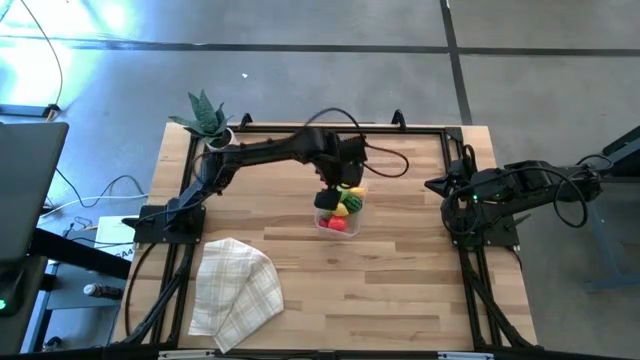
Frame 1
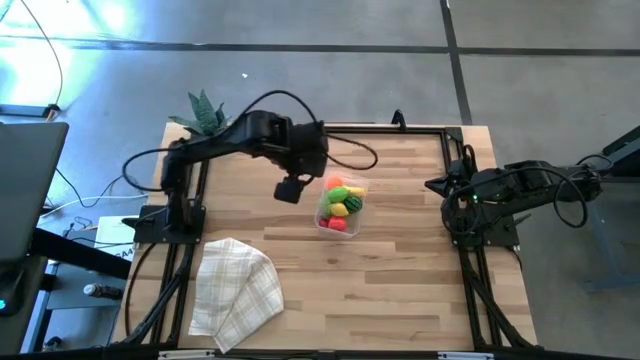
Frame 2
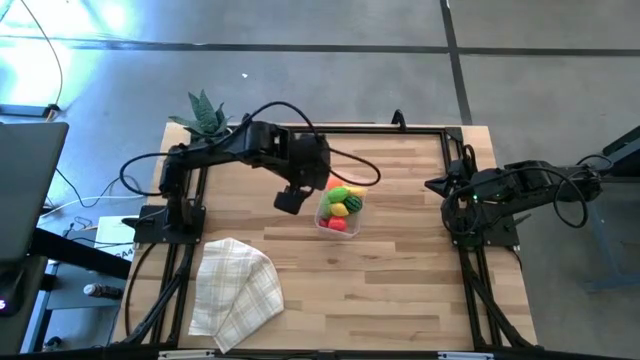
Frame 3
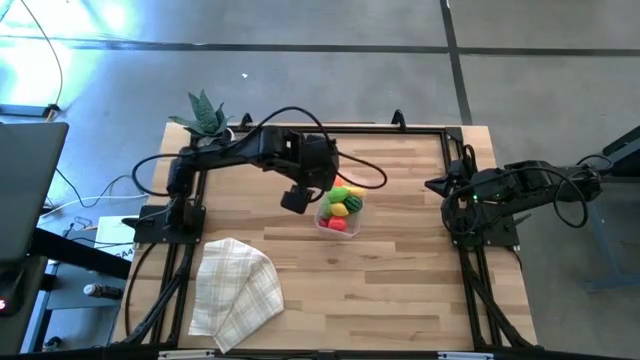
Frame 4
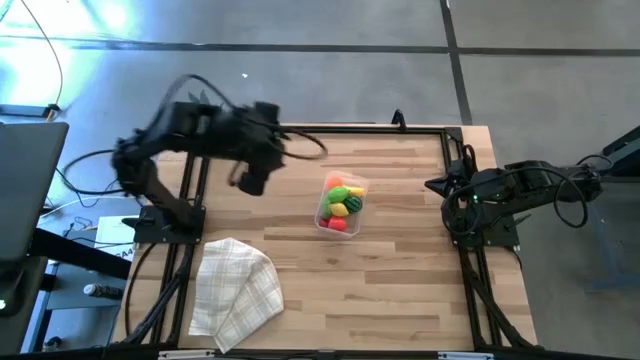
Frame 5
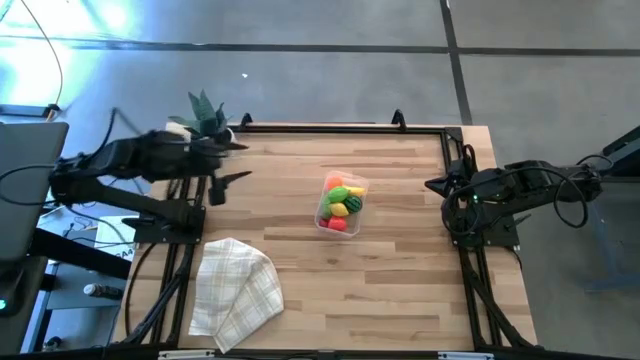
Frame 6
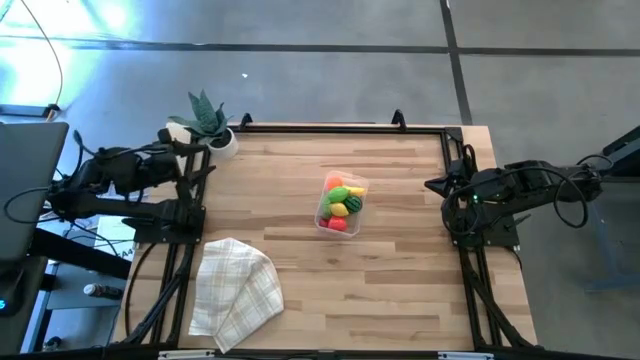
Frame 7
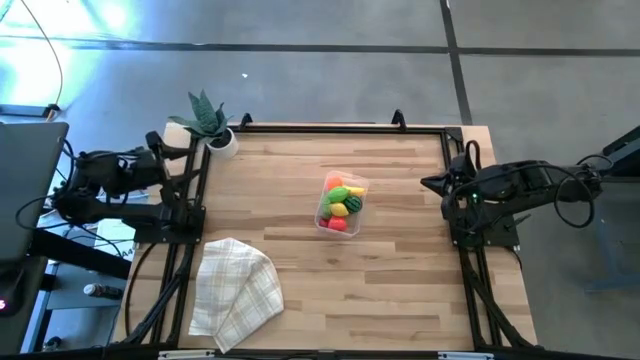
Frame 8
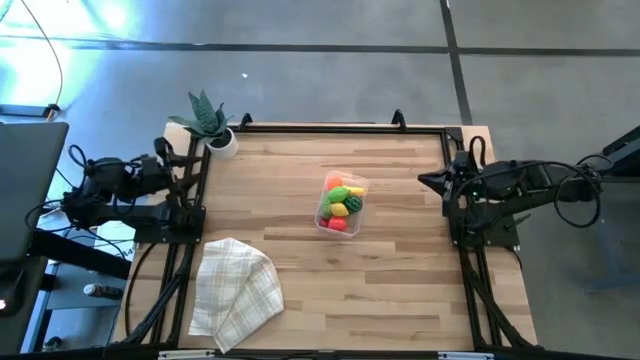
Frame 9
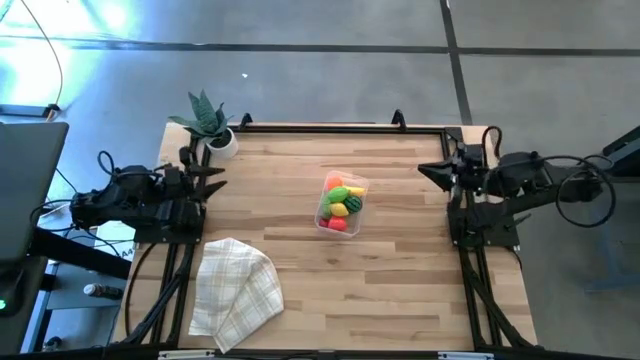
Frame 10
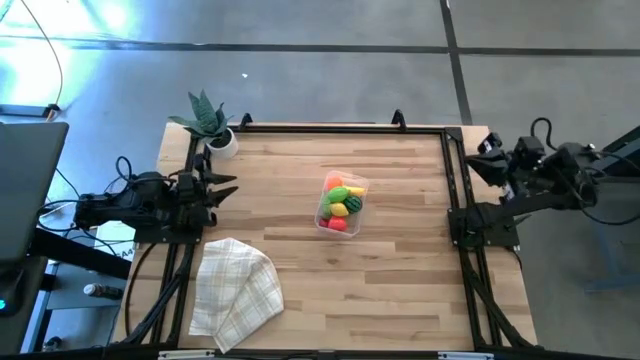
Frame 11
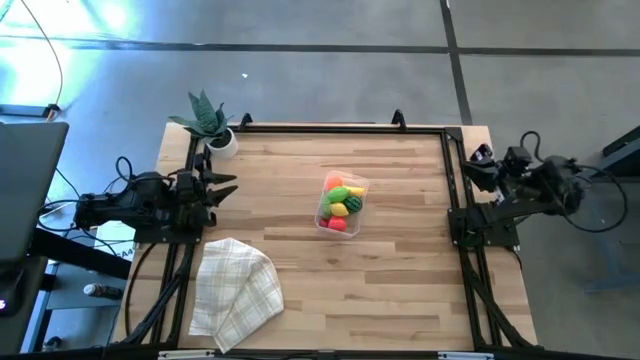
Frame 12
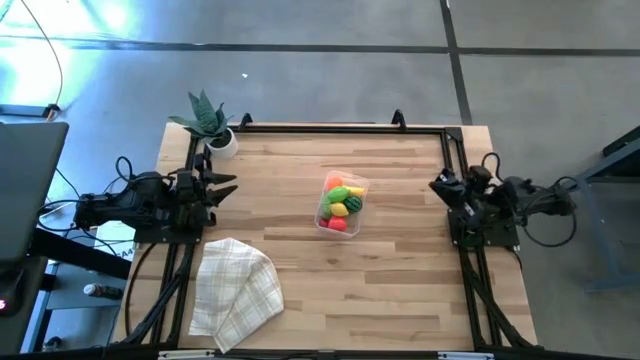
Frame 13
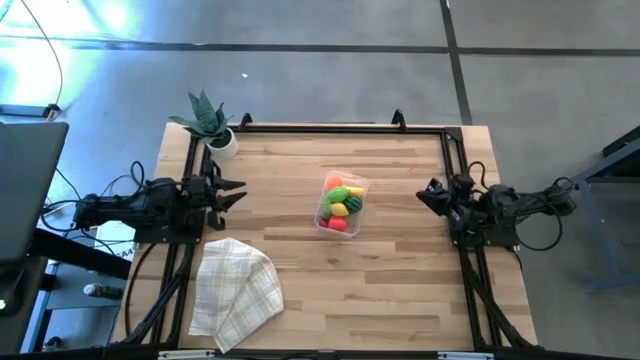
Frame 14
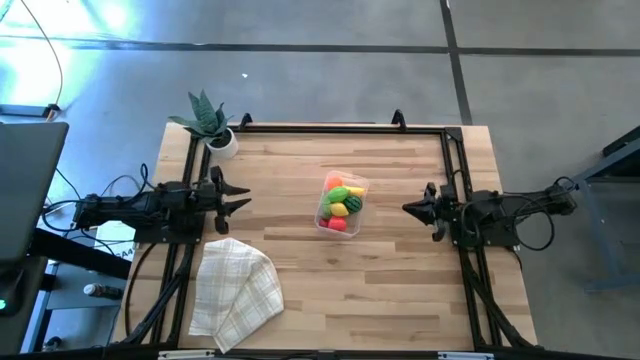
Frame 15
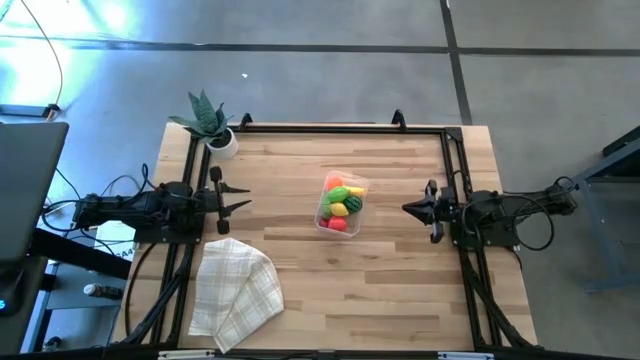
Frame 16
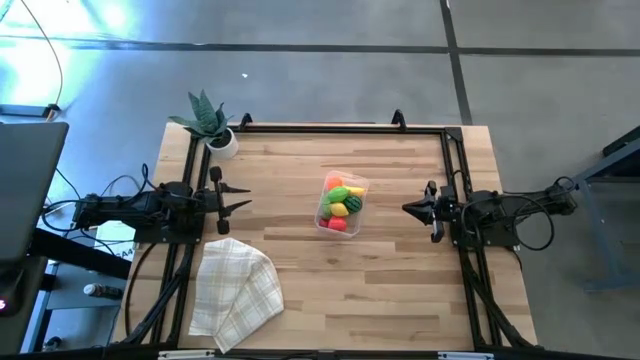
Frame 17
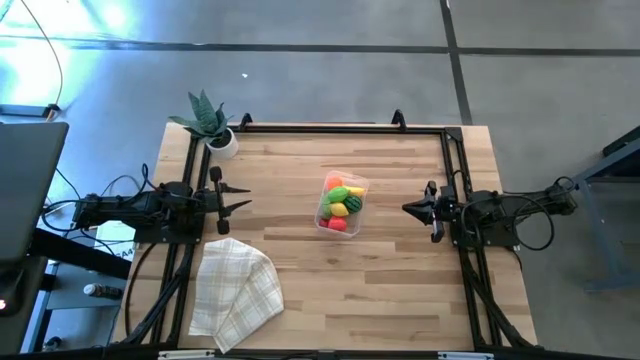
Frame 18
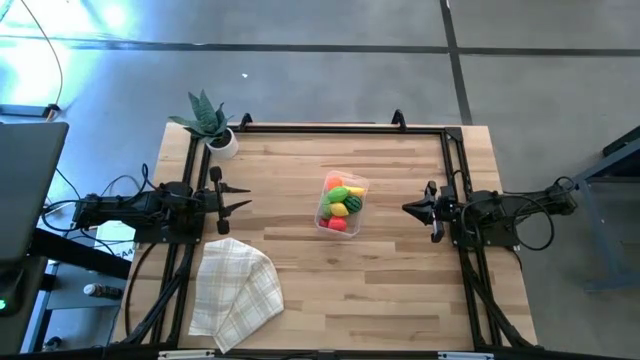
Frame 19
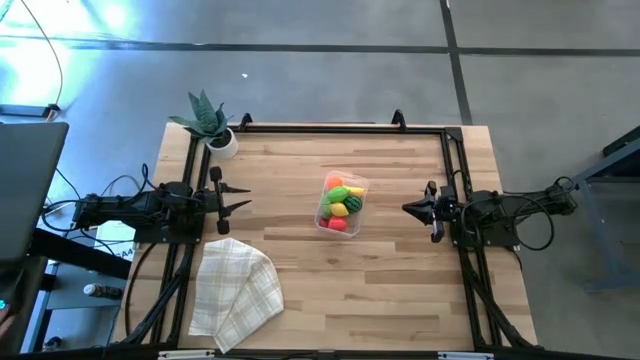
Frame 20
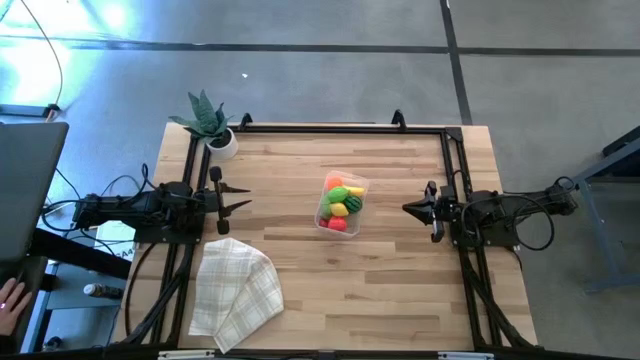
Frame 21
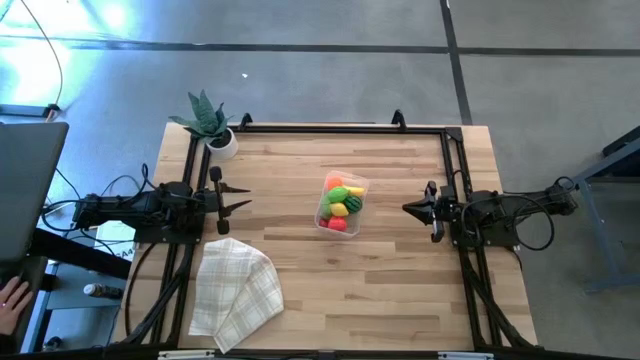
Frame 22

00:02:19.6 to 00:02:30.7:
Task: Pick and placing Produce into tupperware
Return to Home Position

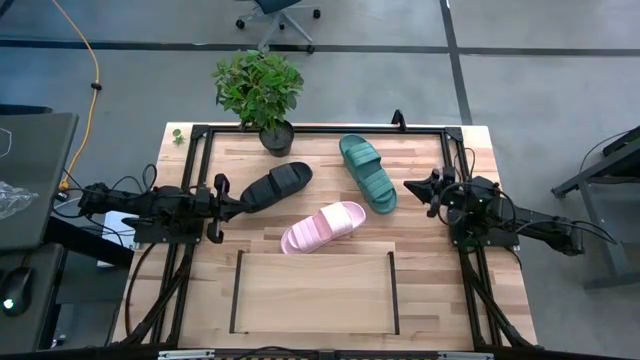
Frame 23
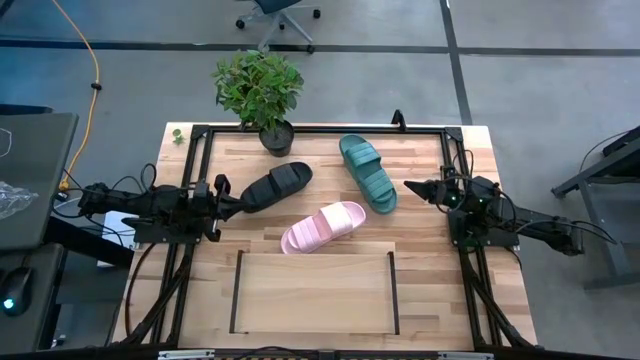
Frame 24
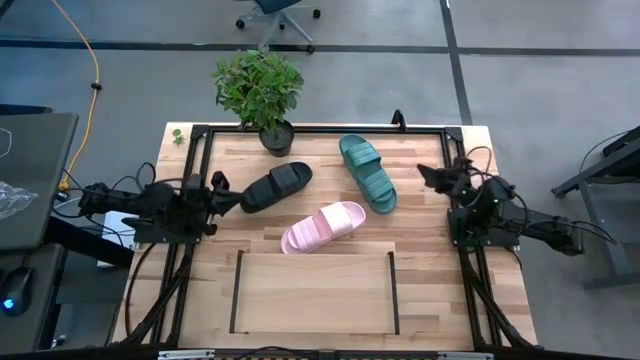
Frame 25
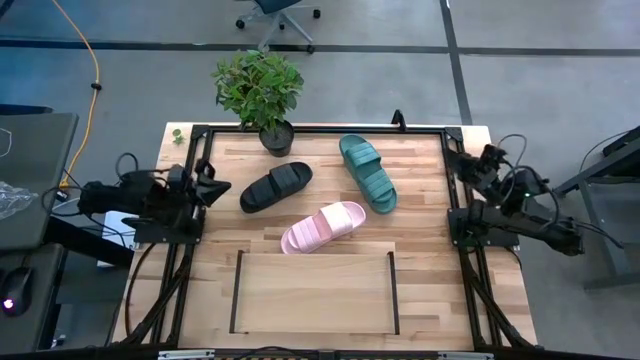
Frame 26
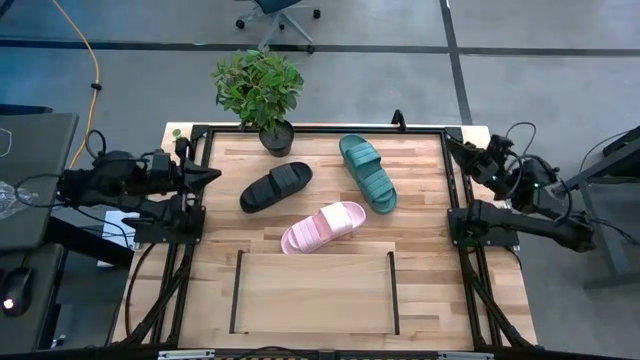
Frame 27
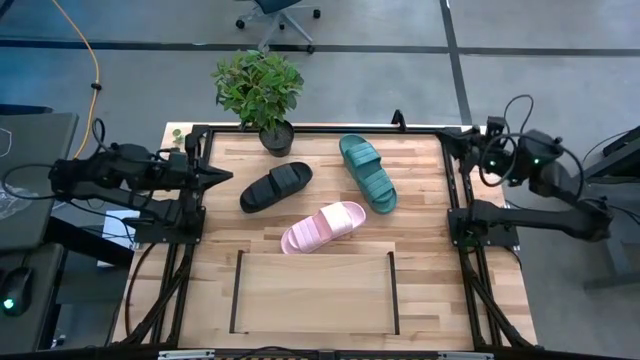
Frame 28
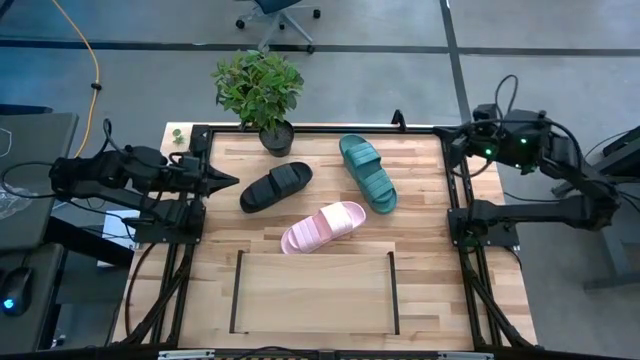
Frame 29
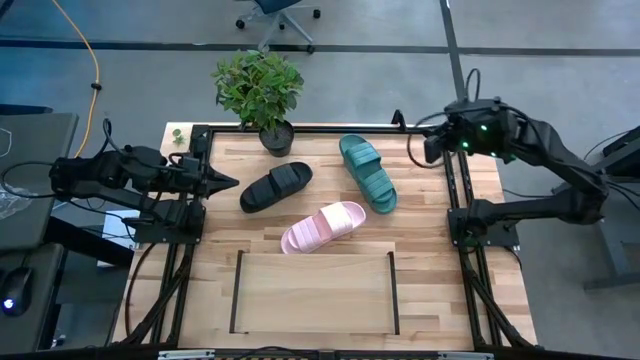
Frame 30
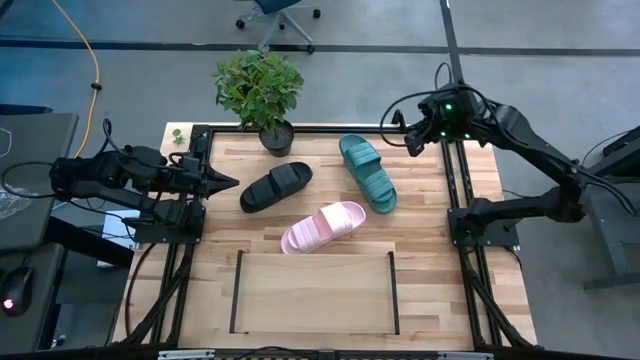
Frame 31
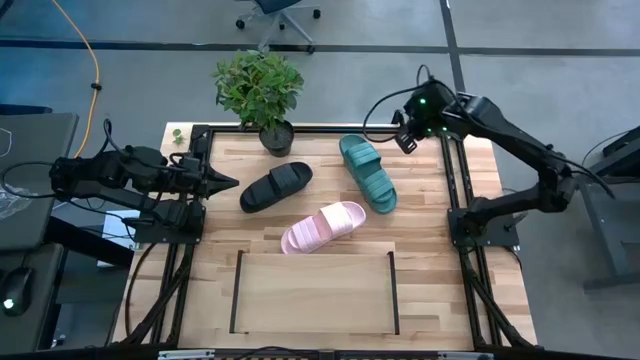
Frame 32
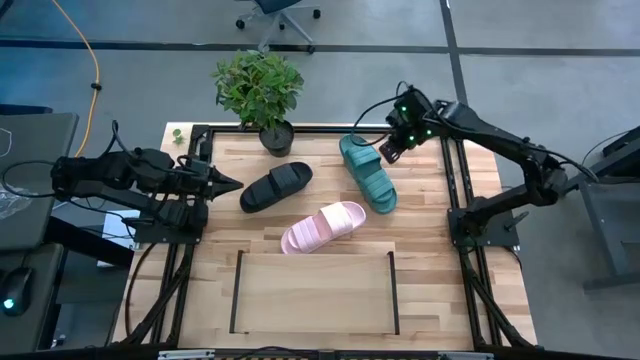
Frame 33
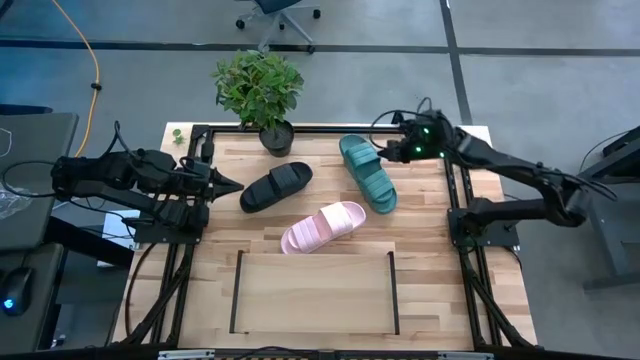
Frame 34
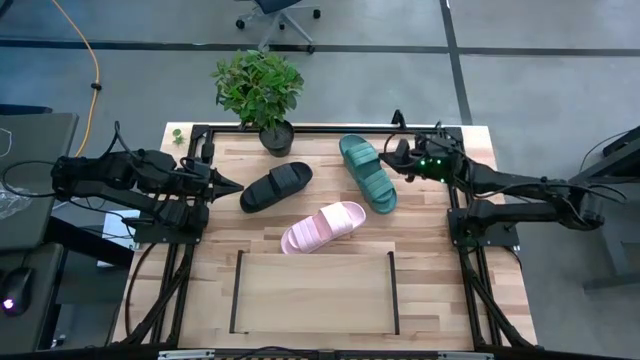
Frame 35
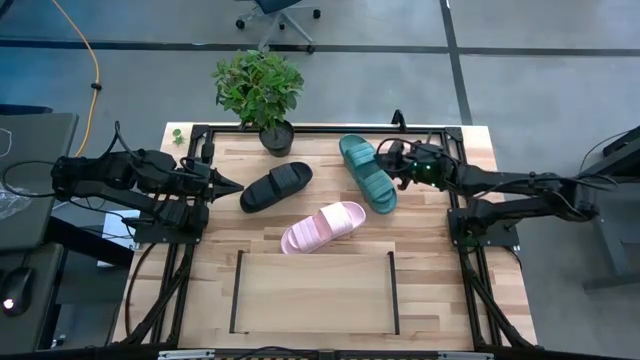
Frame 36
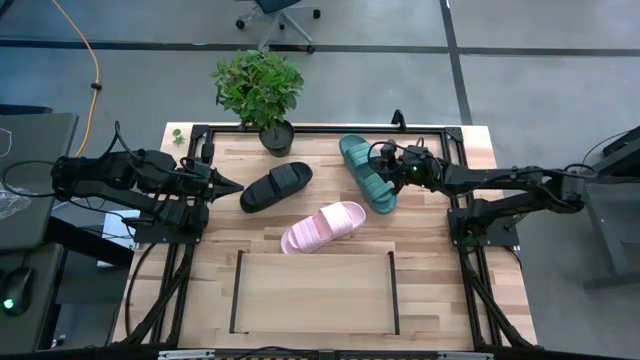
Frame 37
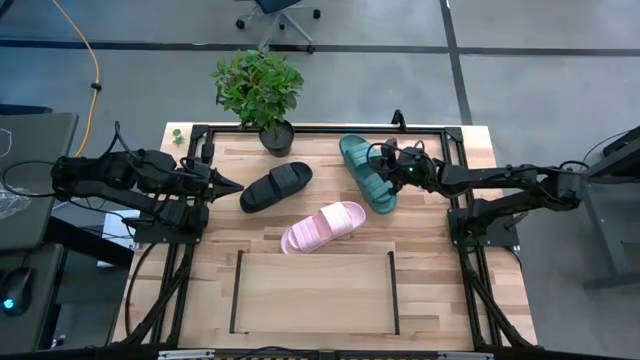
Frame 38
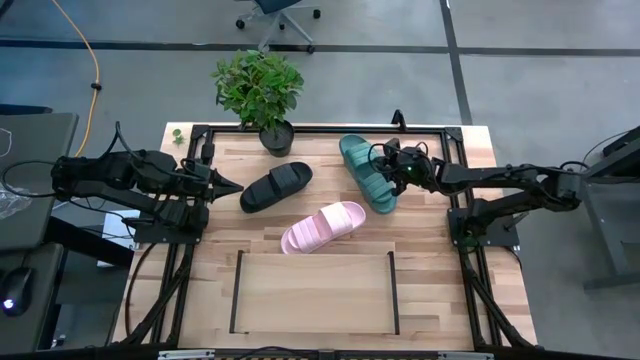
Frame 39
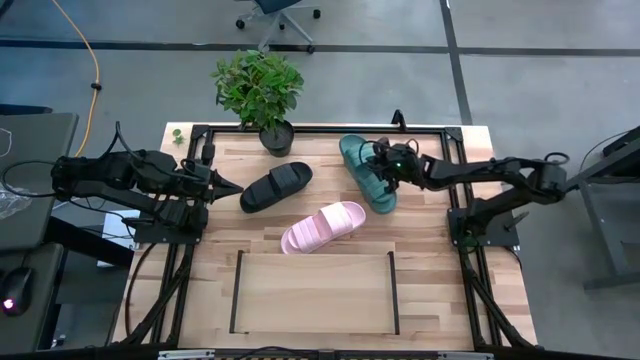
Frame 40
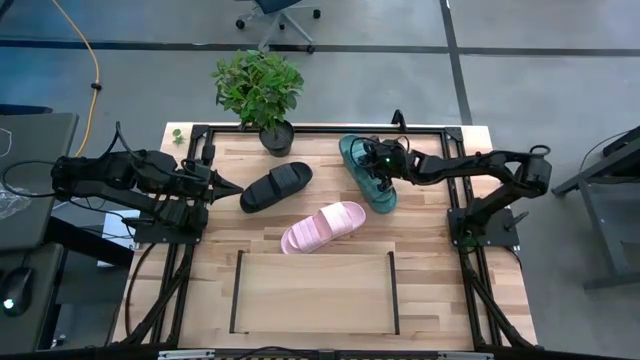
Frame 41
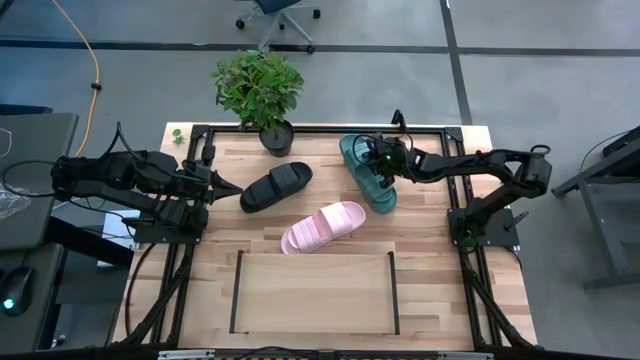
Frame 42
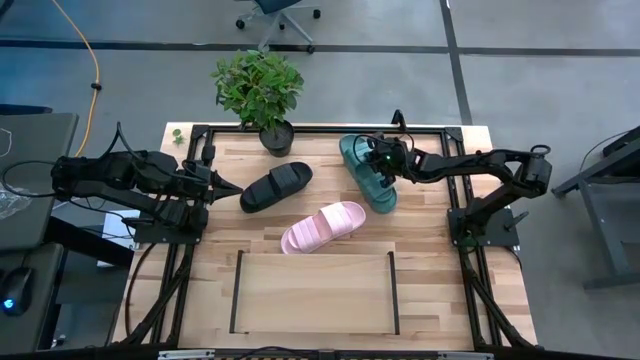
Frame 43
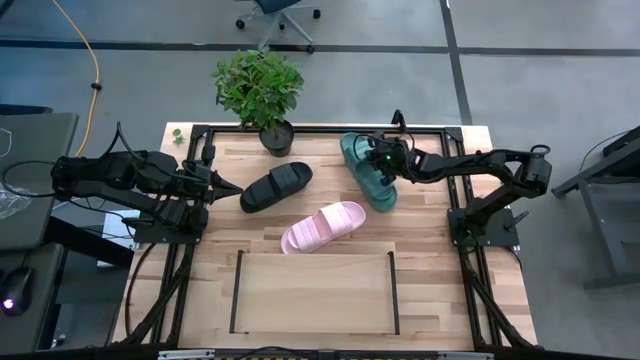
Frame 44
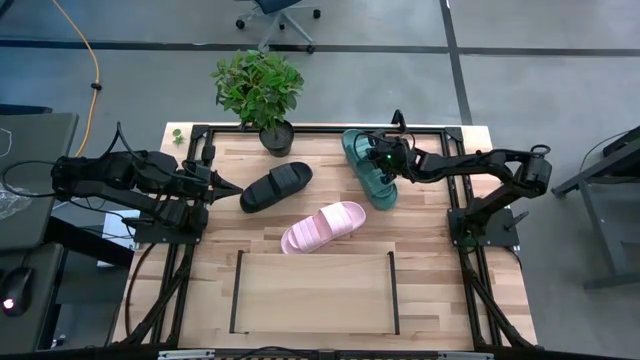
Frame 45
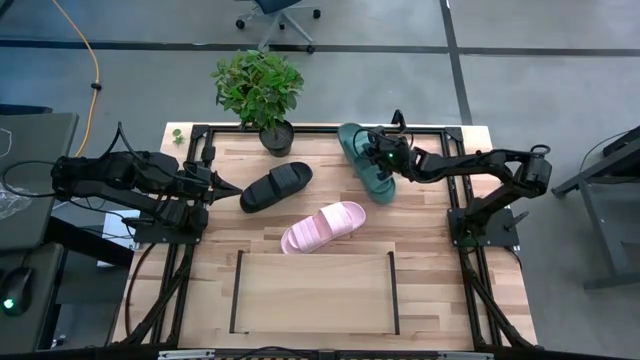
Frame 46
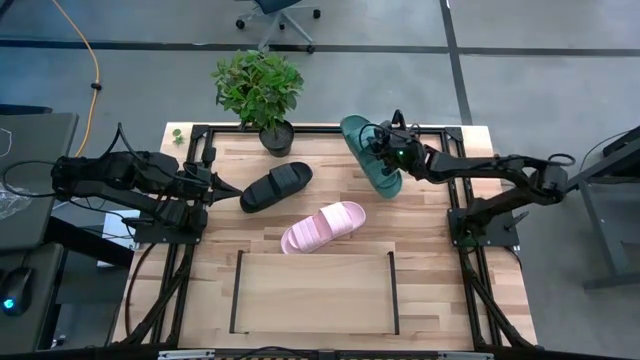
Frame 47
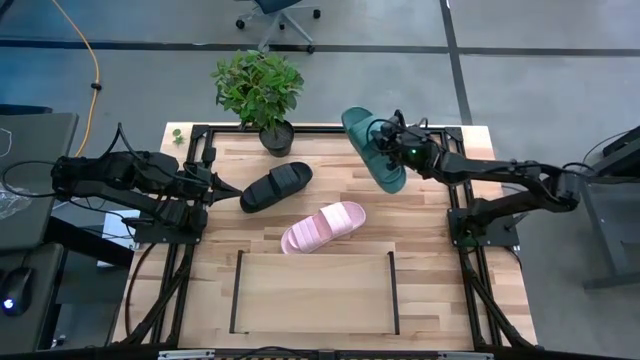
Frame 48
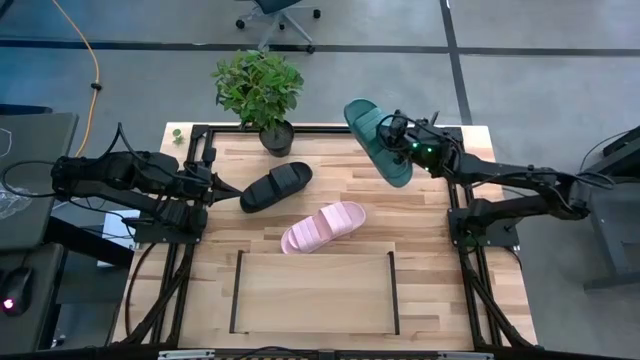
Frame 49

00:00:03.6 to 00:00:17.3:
Task: Pick and place slides into the shelf
Put the green pair of slides on the shelf
